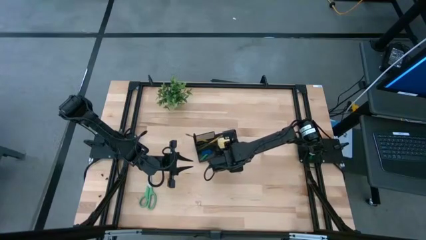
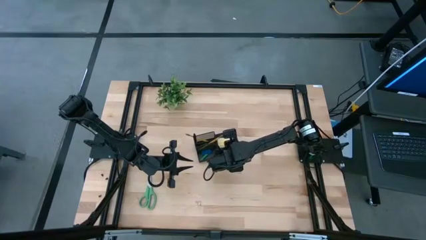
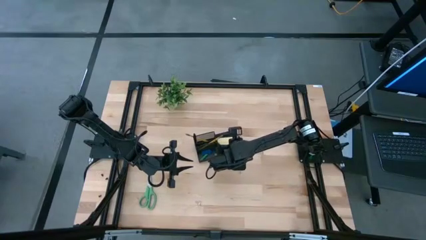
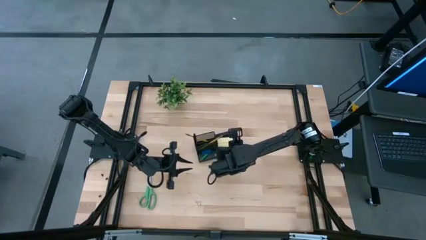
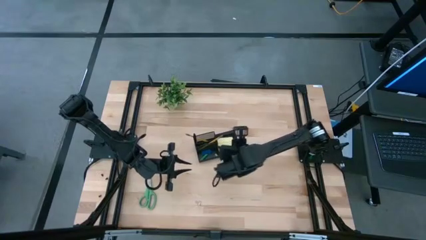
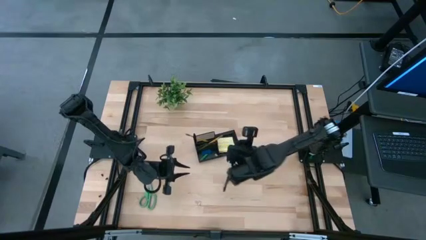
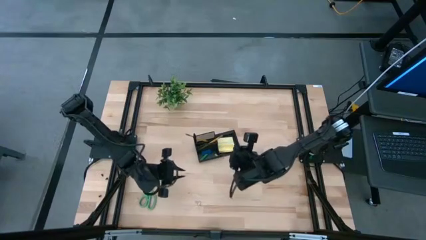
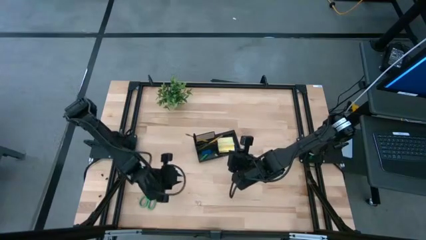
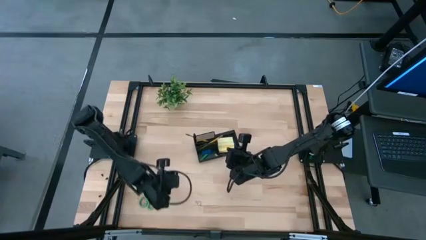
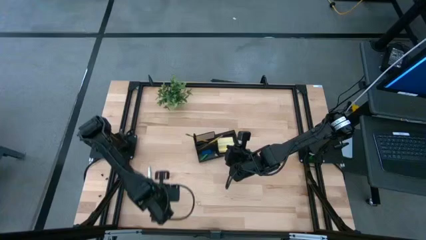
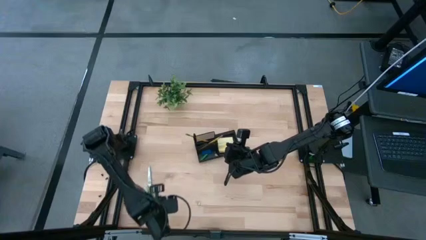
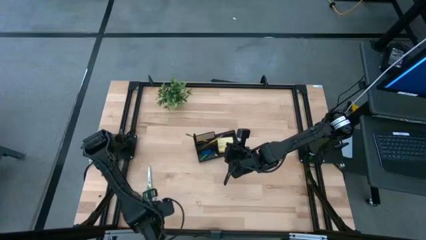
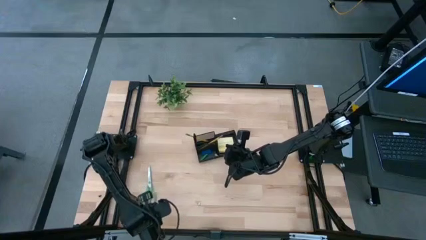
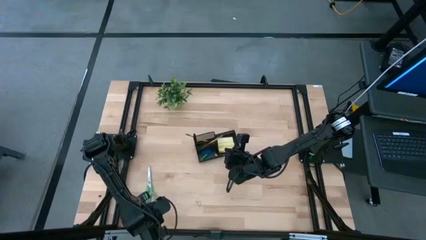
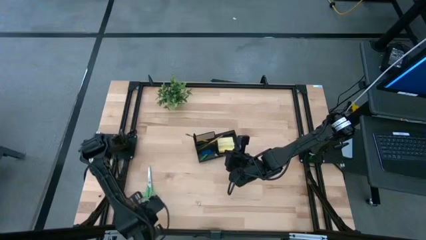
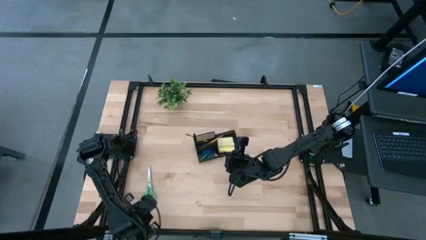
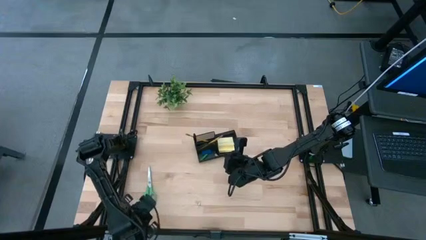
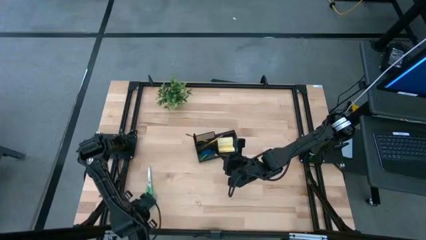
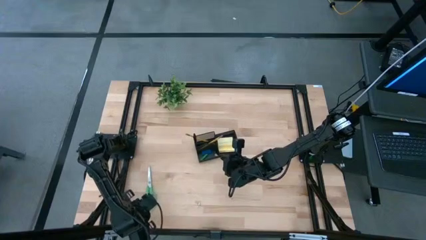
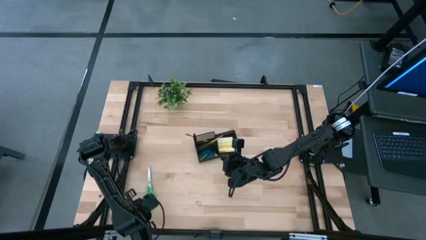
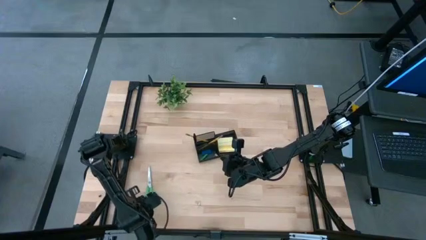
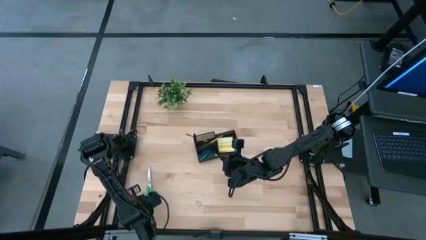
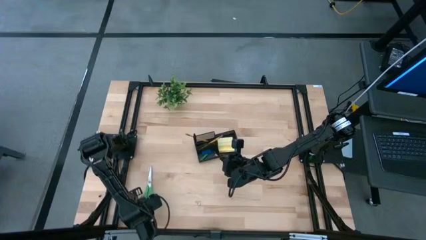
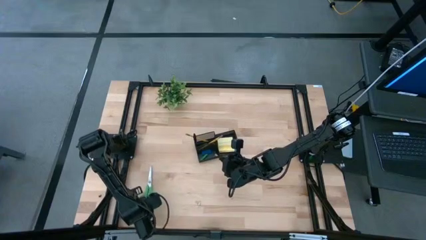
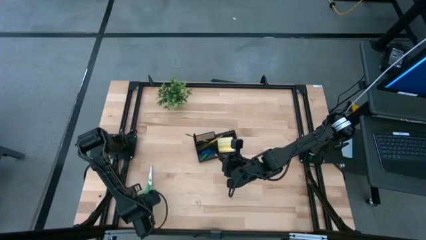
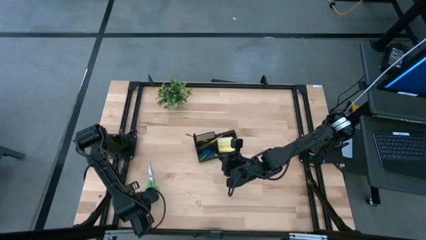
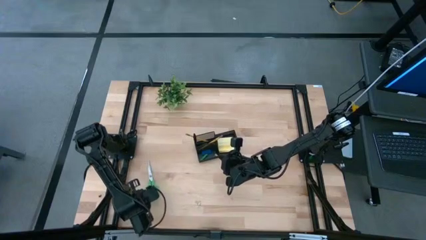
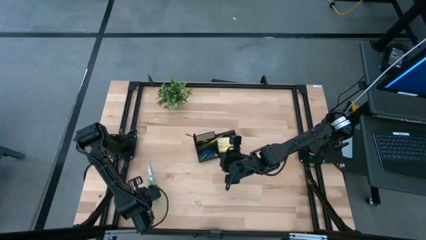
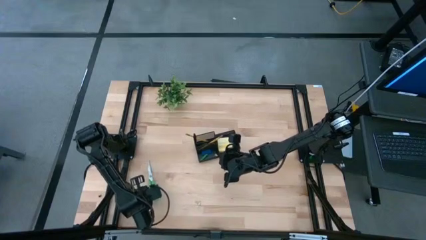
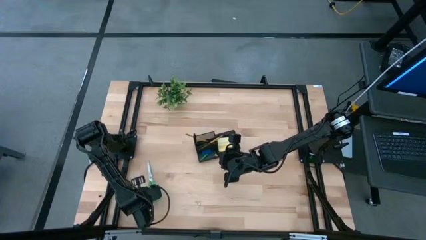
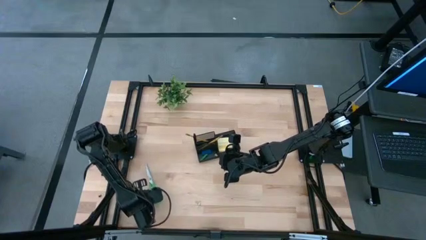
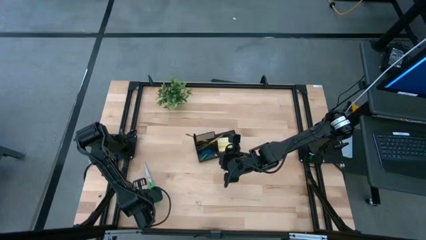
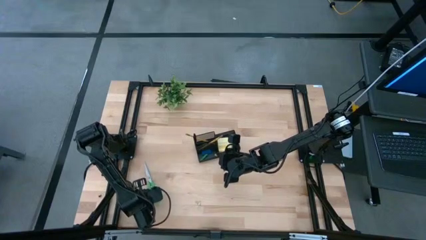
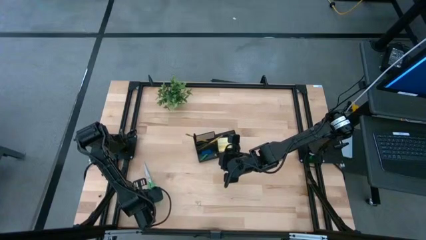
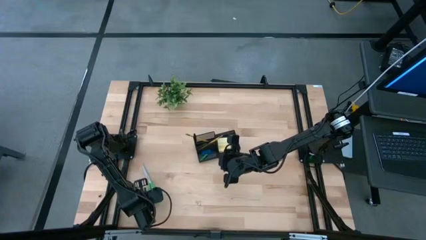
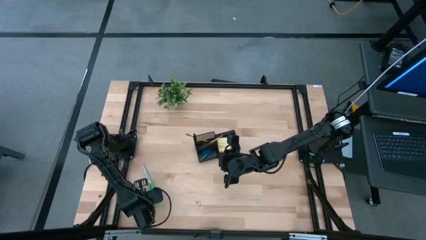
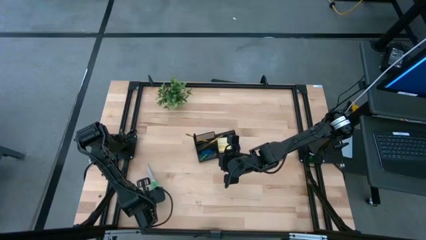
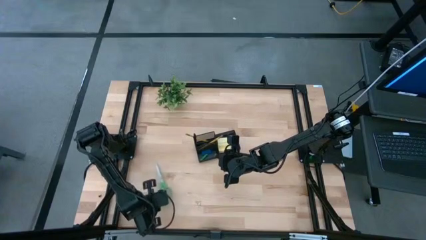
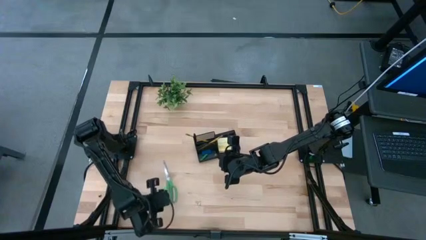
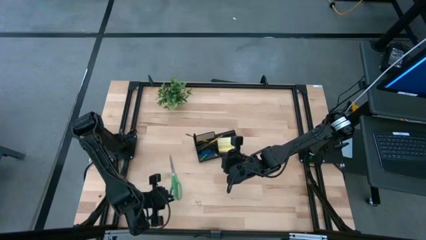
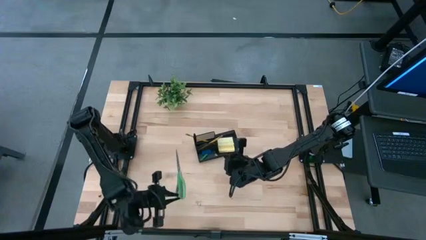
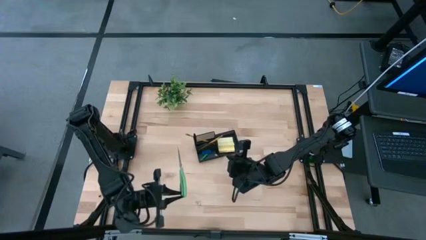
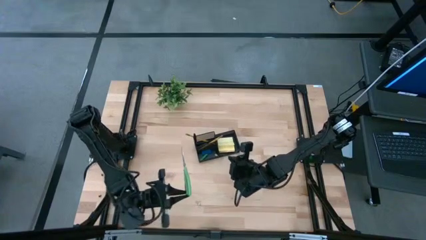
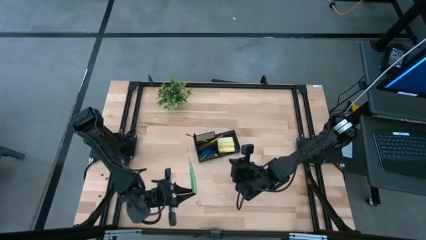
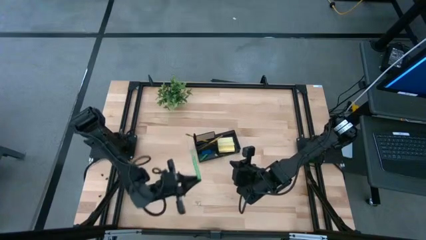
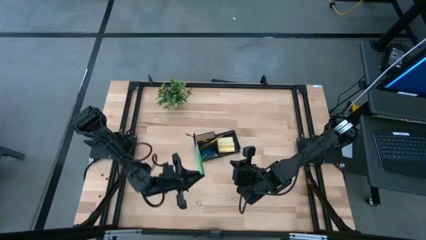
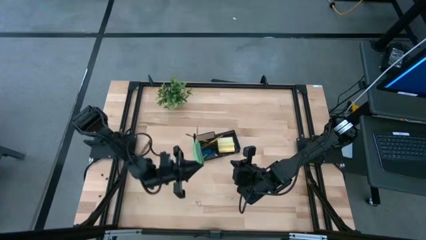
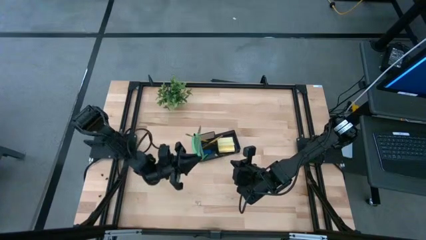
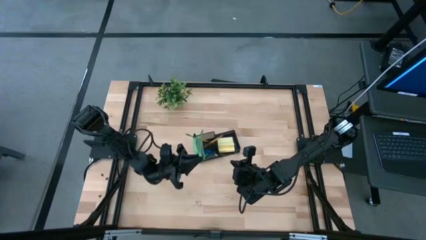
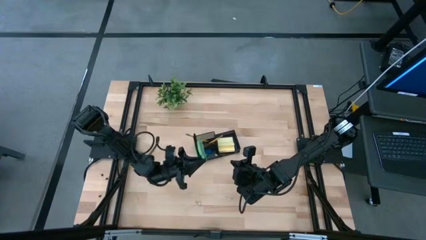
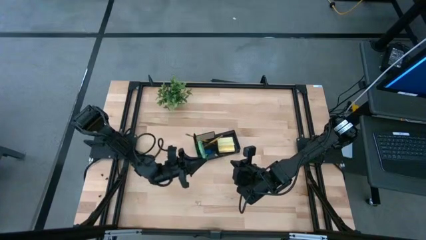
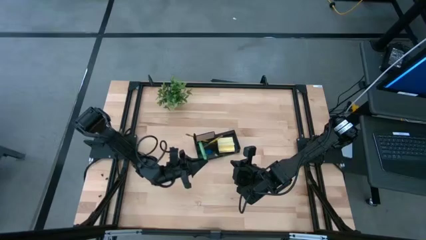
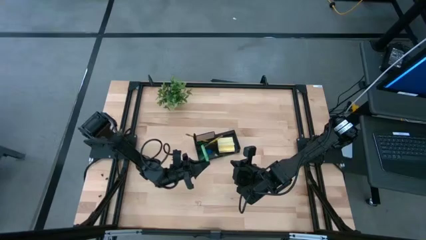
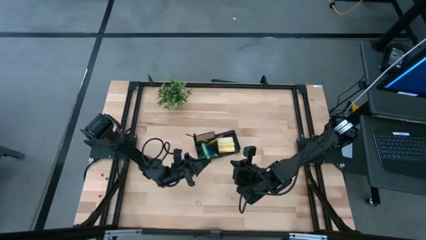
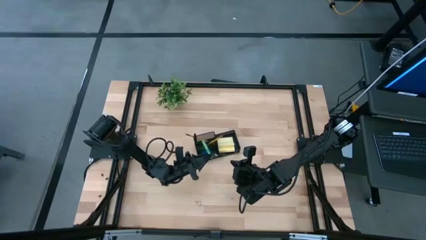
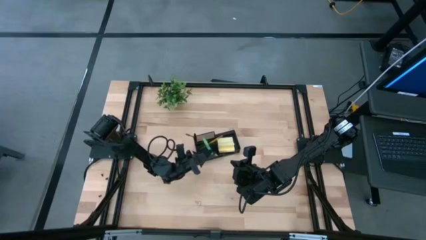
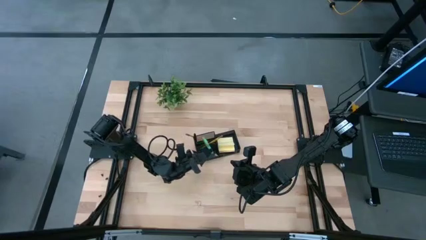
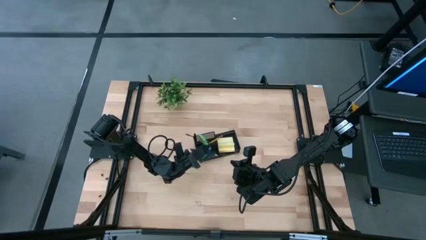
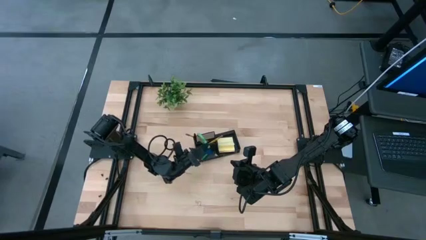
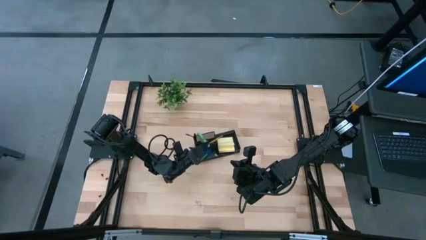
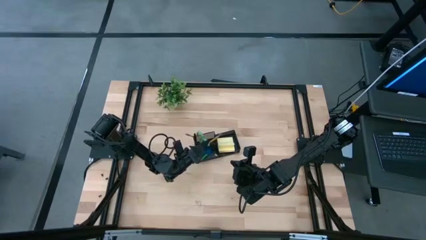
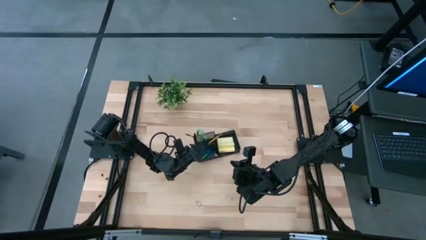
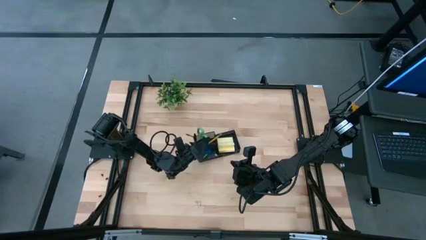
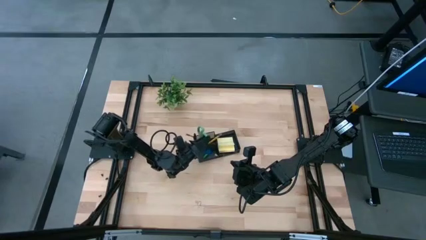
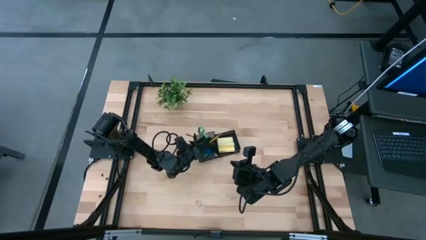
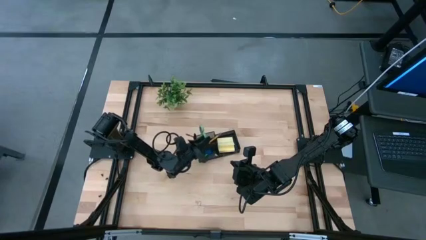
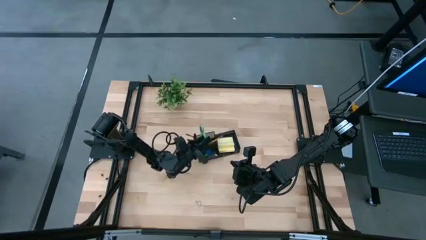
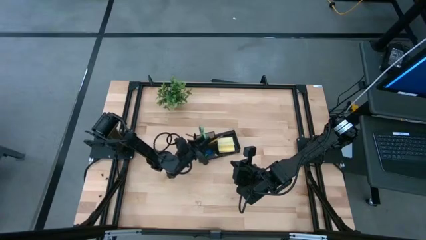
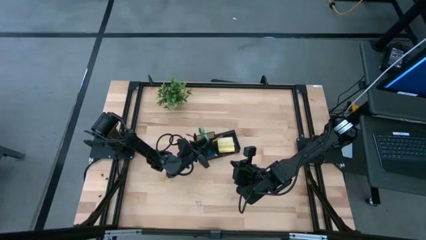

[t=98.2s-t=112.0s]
Task: Pick and place office supplies into organizer
Put the green scissors into the black desk organizer

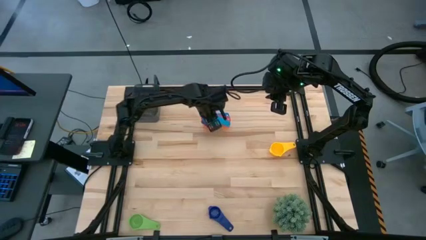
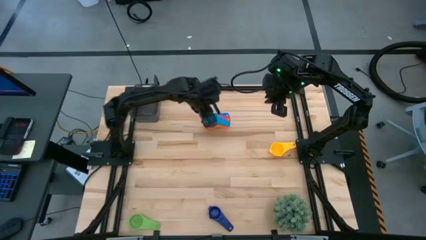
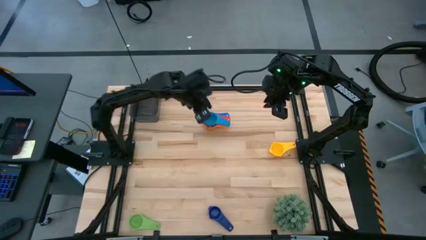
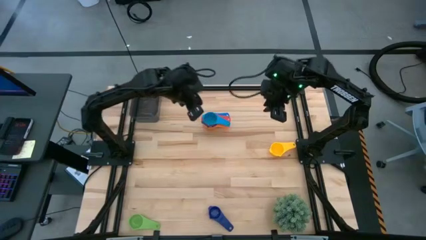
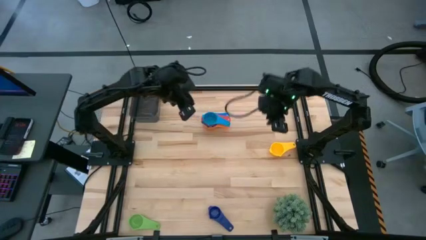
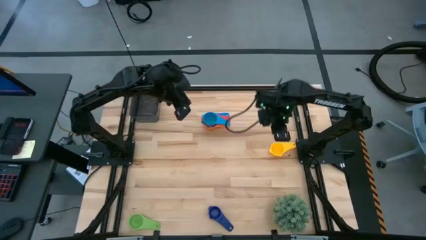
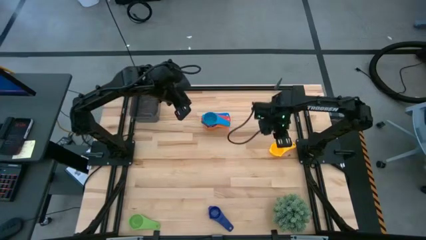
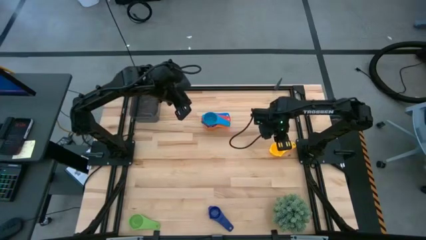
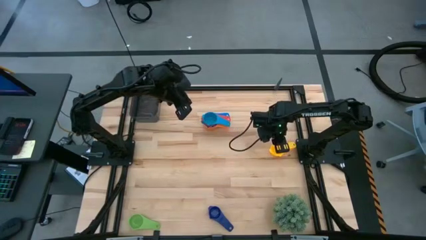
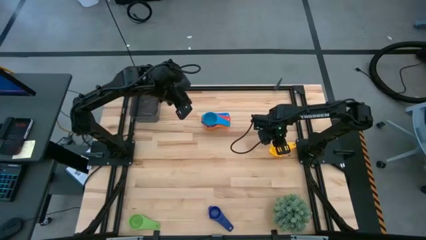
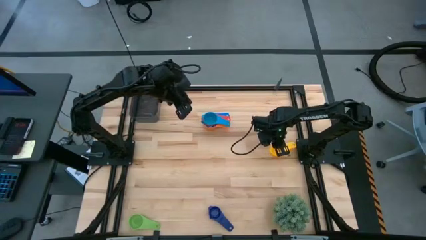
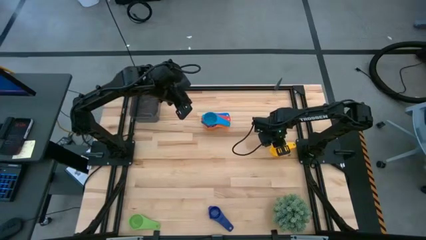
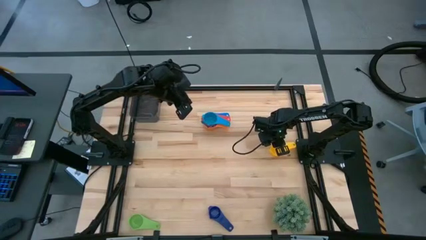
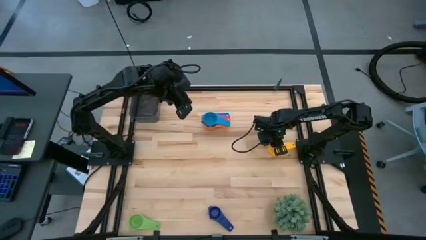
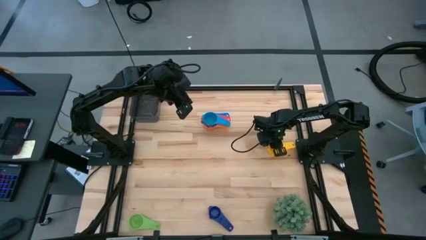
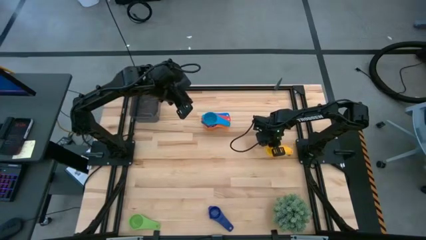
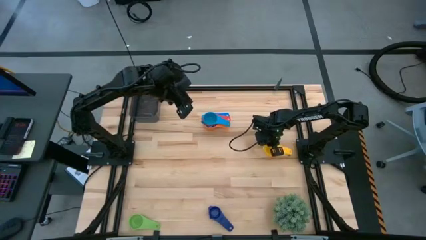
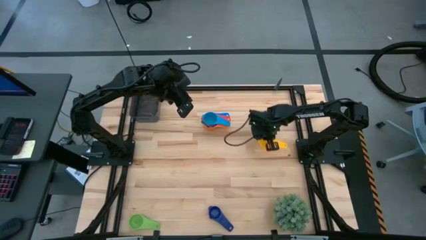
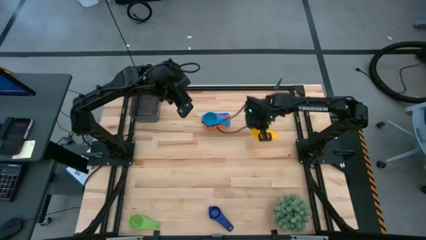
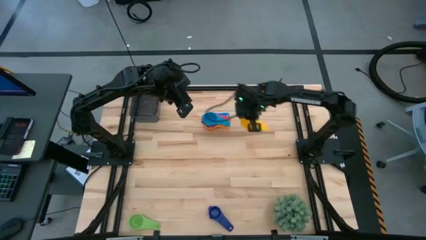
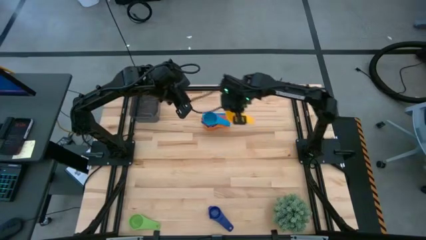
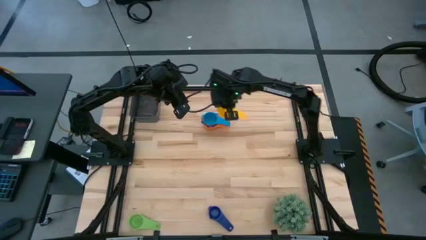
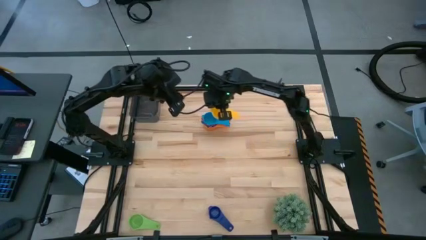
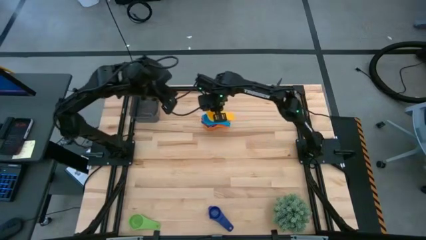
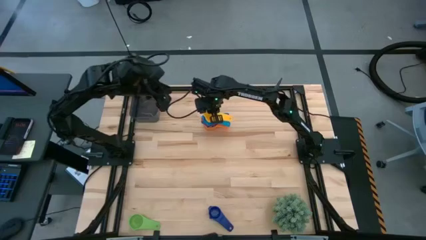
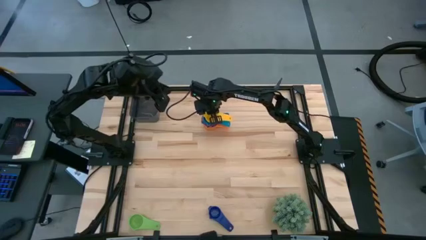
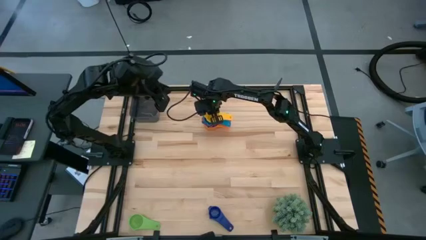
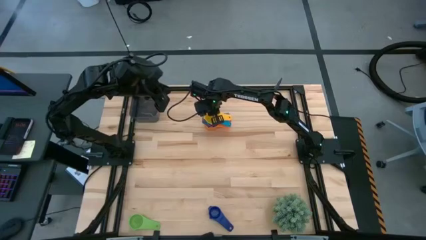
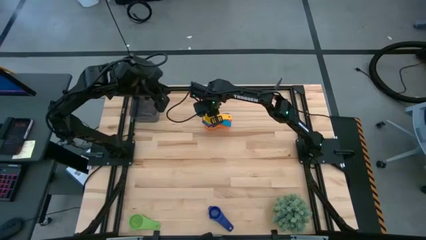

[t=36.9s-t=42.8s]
Task: Nest measuring cups in basket
Stack the yellow measuring cup on top of the light blue measuring cup
